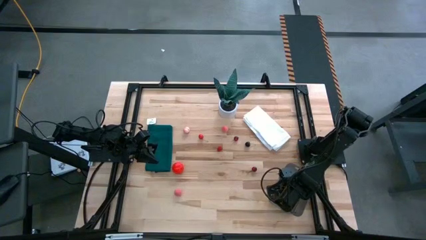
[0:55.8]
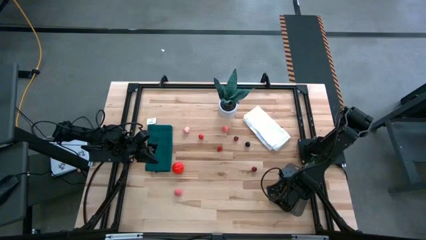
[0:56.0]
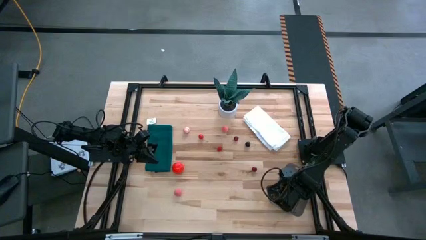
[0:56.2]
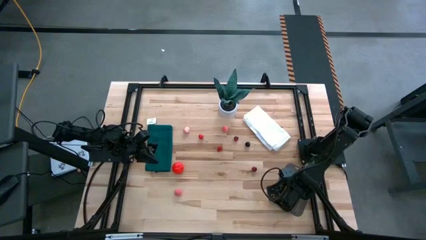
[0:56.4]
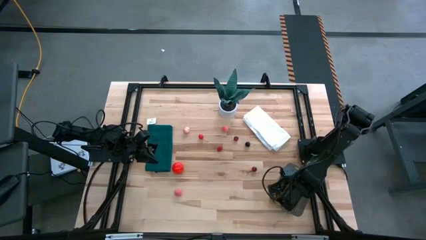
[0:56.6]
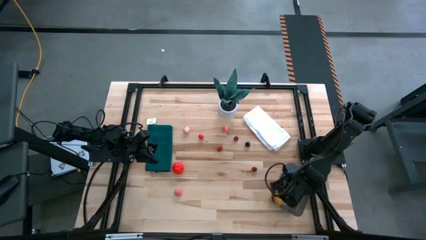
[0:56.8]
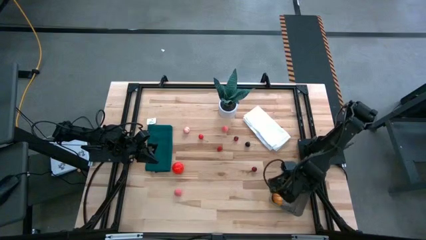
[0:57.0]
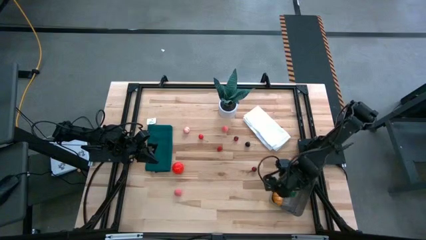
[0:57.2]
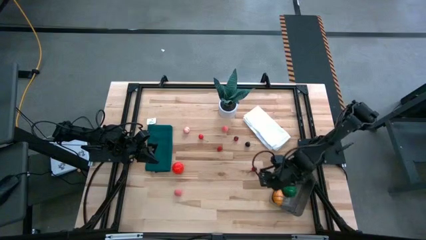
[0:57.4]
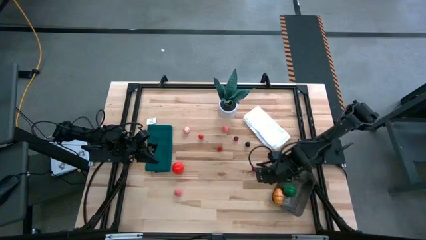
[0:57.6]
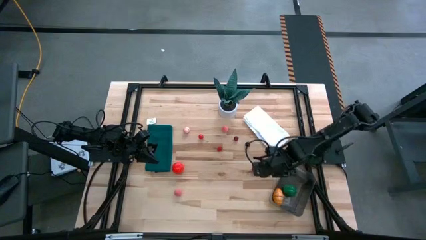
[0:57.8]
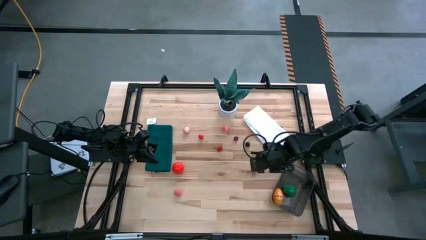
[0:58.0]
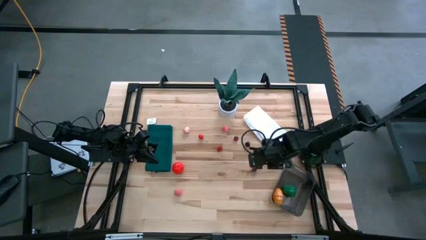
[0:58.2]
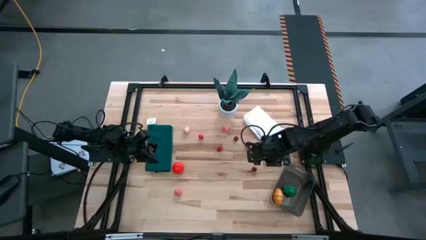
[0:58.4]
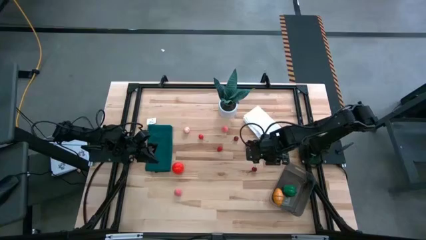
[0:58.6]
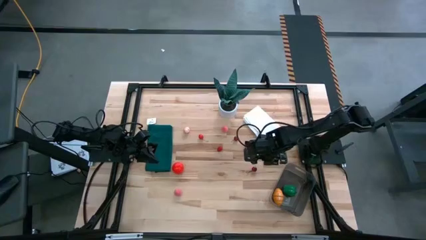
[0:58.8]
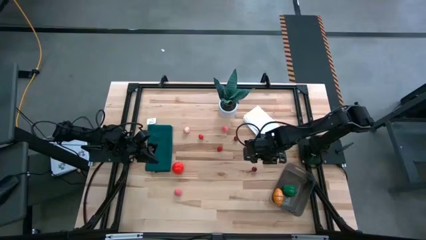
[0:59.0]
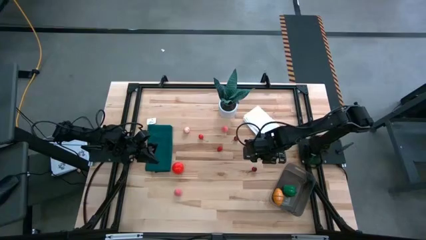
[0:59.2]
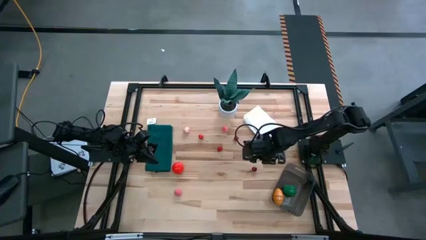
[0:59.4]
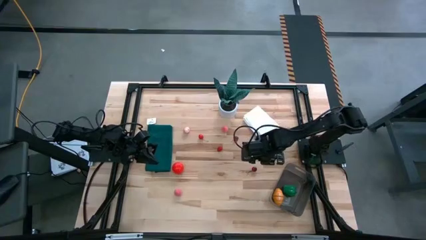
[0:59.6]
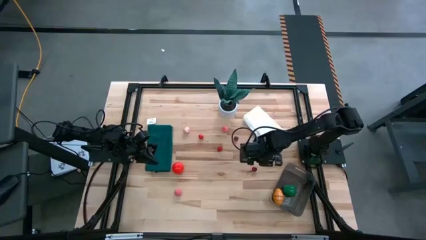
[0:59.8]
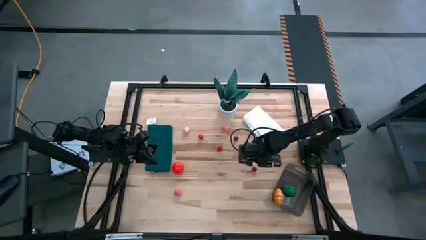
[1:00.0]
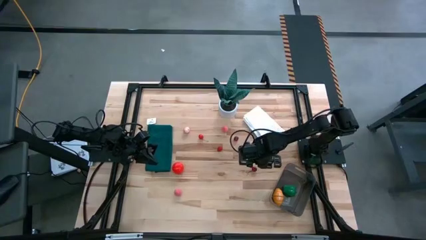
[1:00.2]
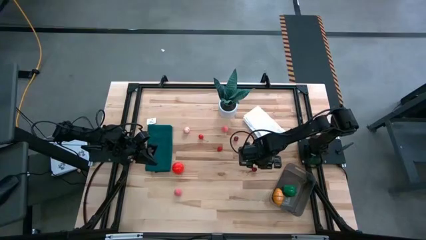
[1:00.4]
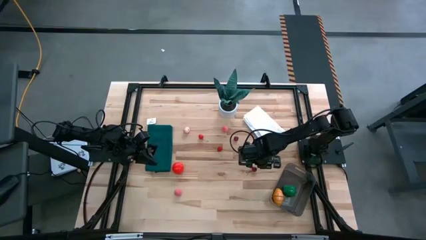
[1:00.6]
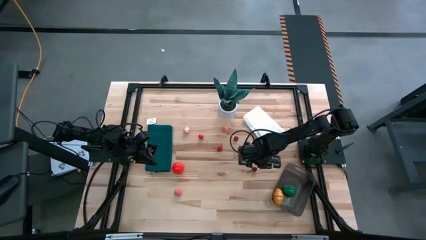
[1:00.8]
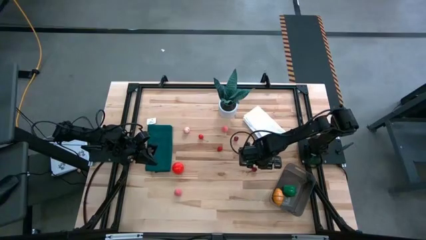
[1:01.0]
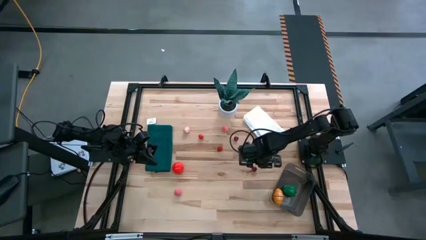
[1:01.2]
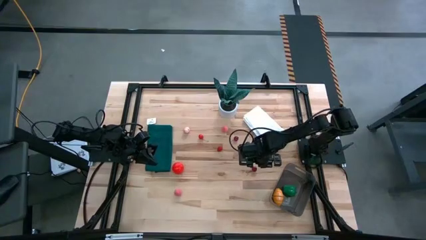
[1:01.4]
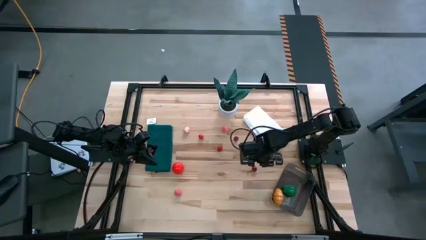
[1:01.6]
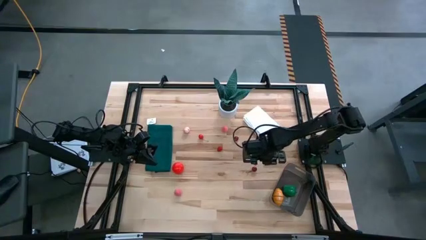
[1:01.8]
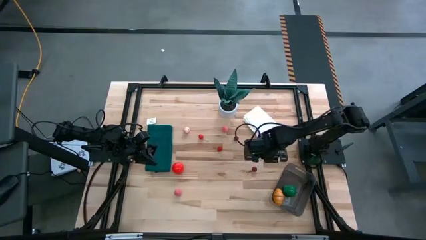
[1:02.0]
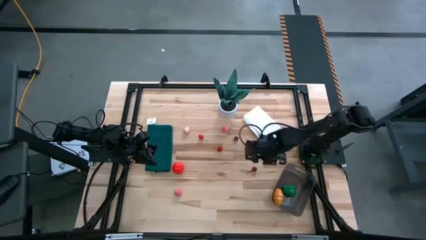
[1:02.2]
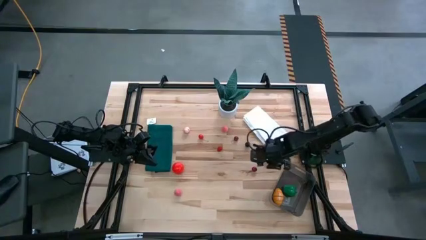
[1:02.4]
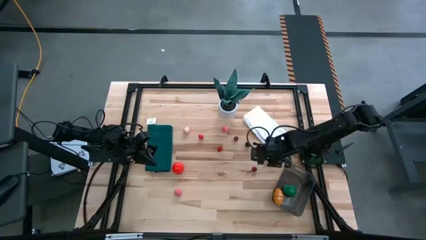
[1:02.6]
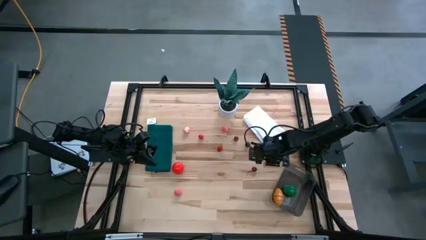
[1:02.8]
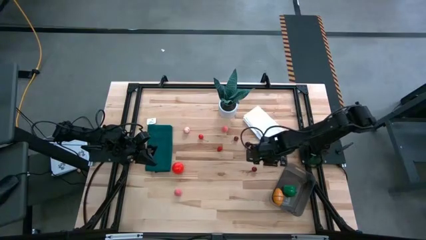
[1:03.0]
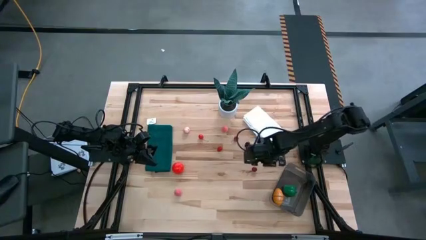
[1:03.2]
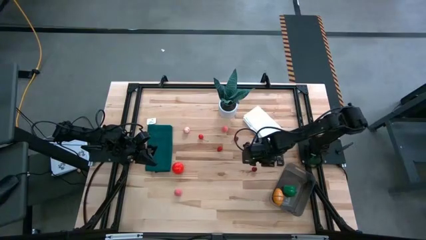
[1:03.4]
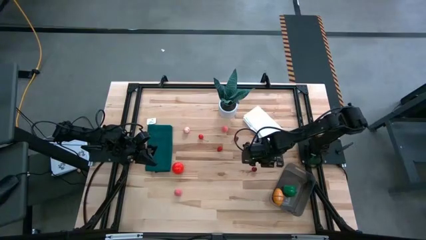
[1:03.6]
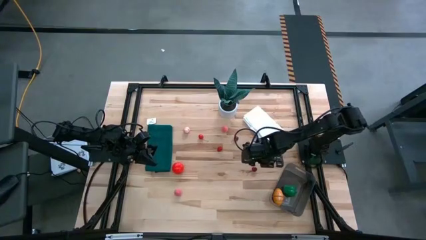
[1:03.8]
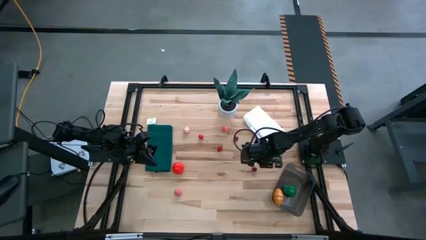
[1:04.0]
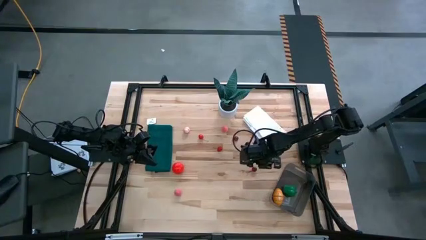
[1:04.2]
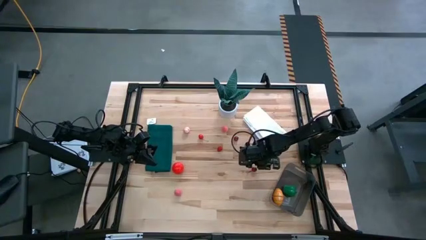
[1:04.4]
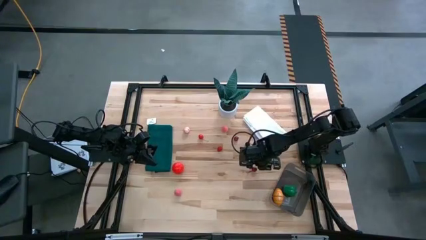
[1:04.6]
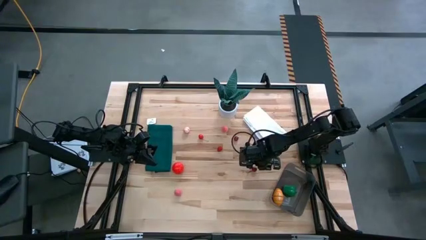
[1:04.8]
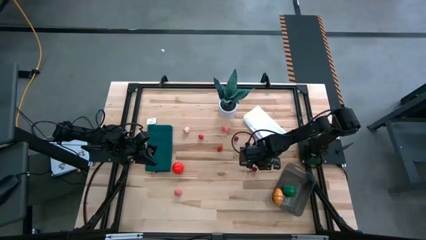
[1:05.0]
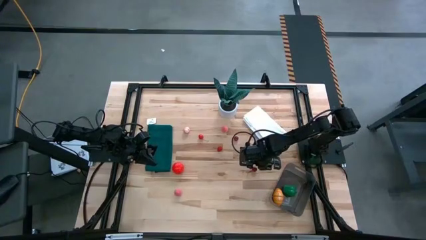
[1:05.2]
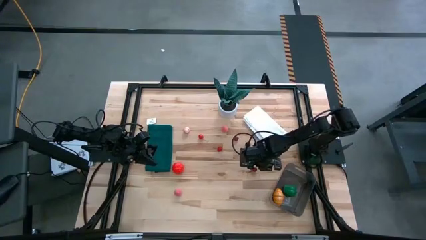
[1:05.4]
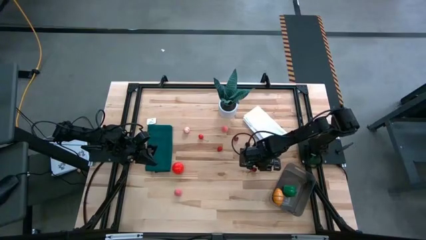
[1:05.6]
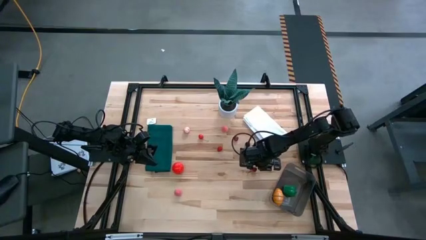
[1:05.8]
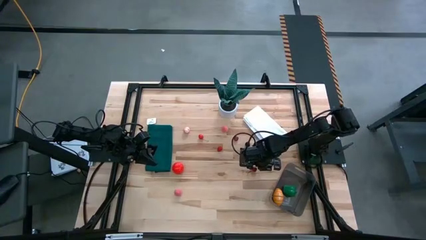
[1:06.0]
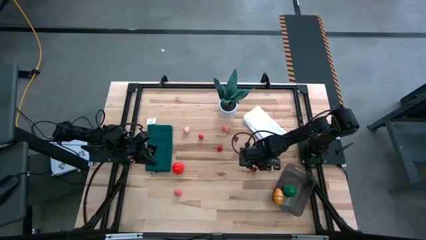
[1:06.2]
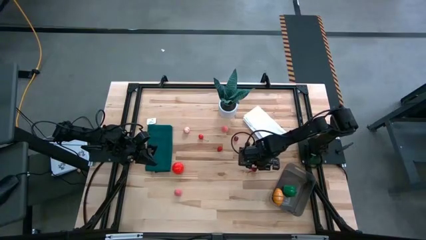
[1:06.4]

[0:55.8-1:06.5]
Task: Pick and placing Produce into tupperware
Put the bottom red cherry into the black bin
